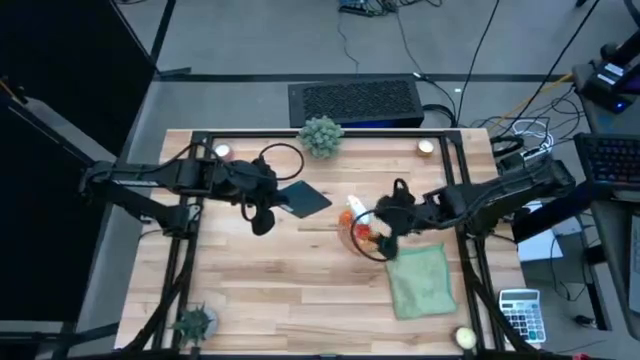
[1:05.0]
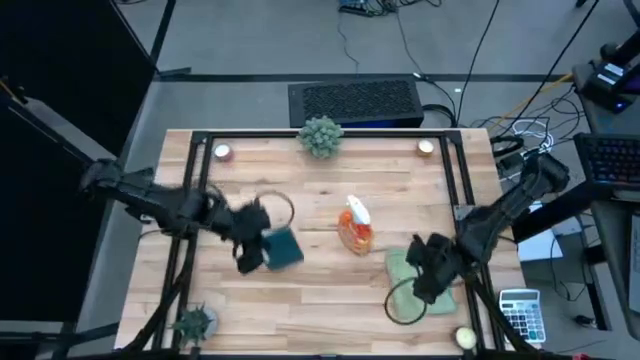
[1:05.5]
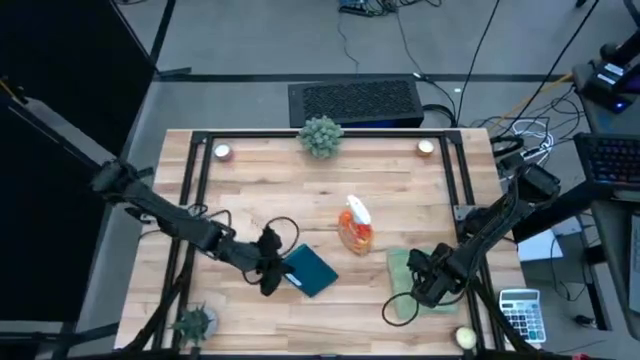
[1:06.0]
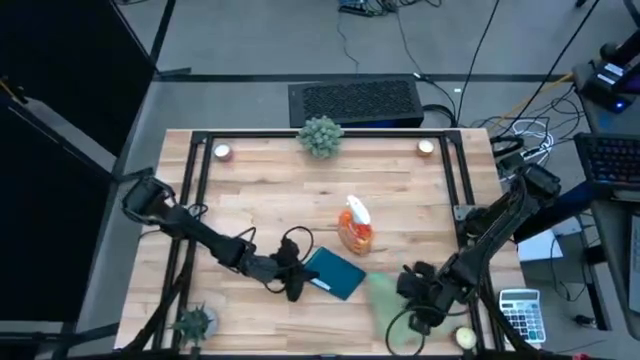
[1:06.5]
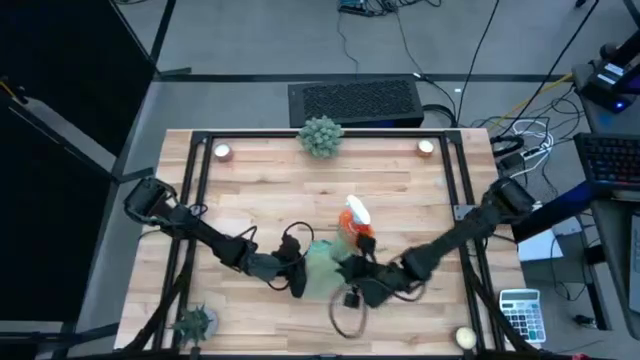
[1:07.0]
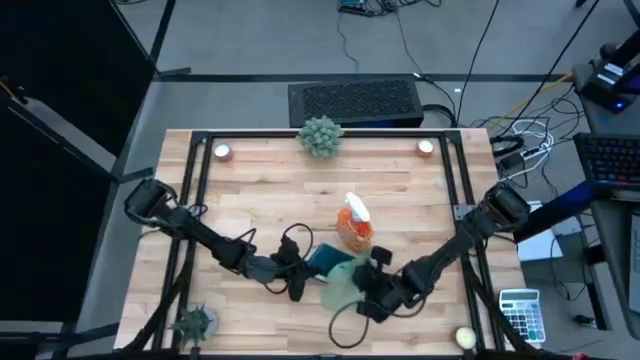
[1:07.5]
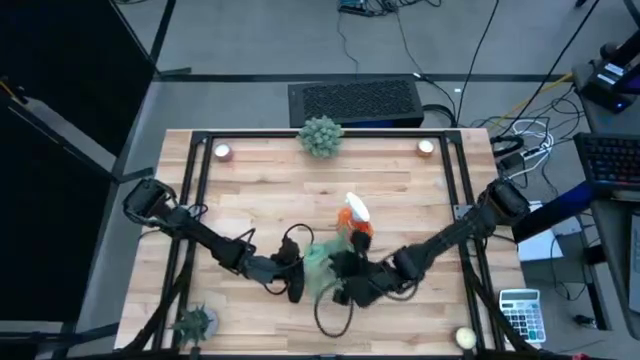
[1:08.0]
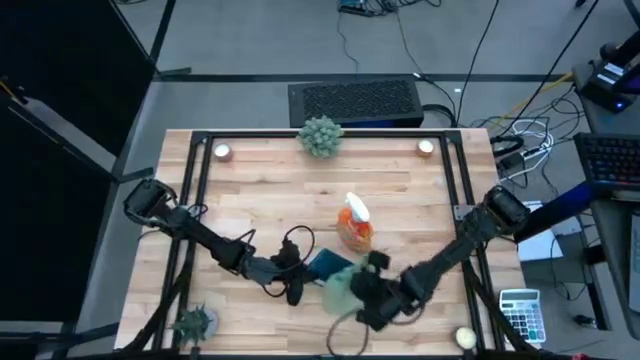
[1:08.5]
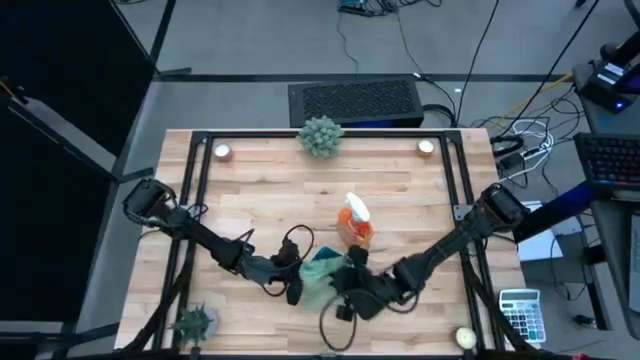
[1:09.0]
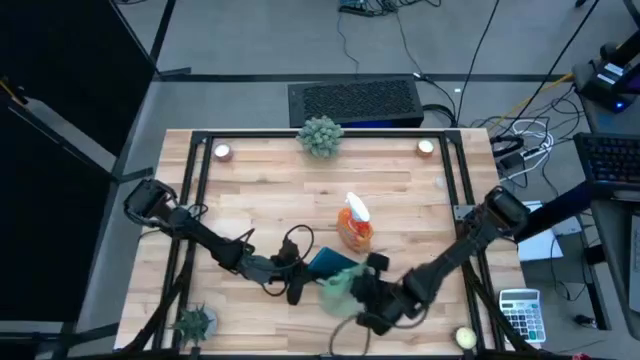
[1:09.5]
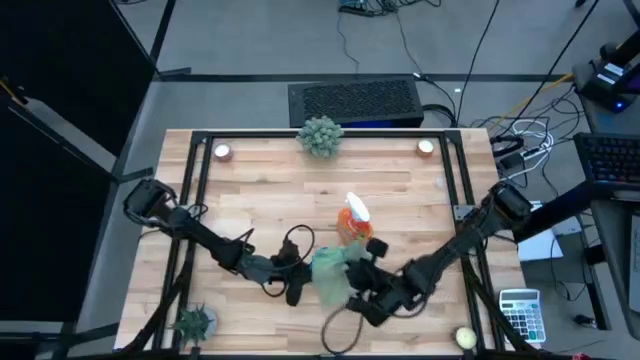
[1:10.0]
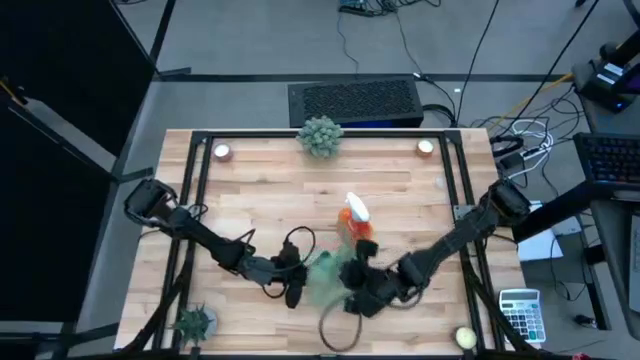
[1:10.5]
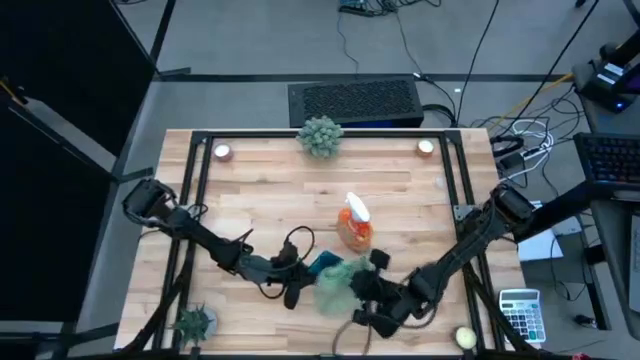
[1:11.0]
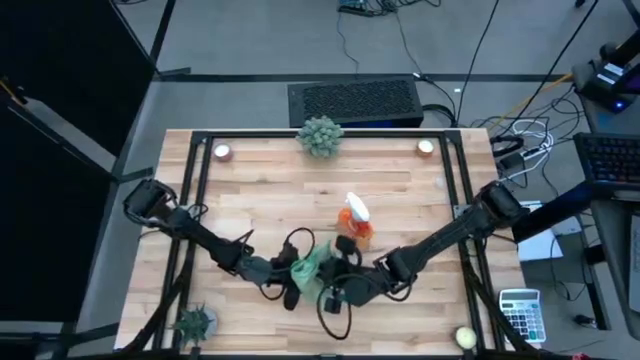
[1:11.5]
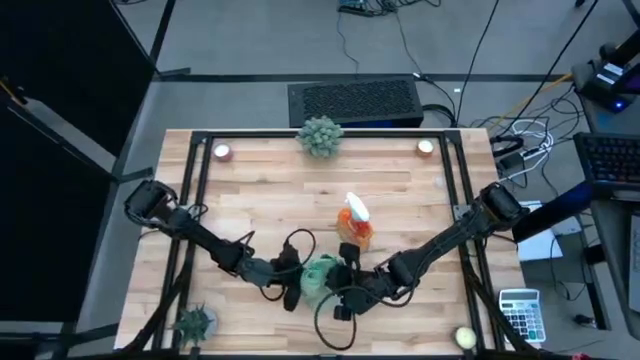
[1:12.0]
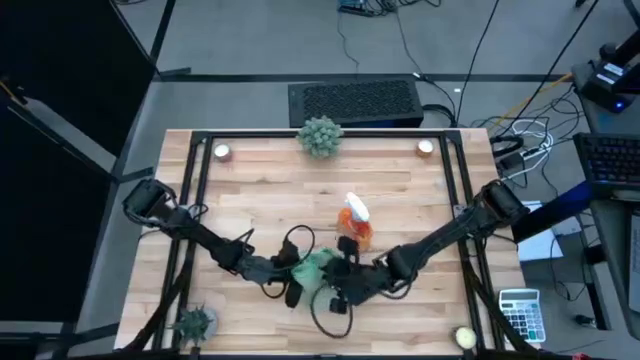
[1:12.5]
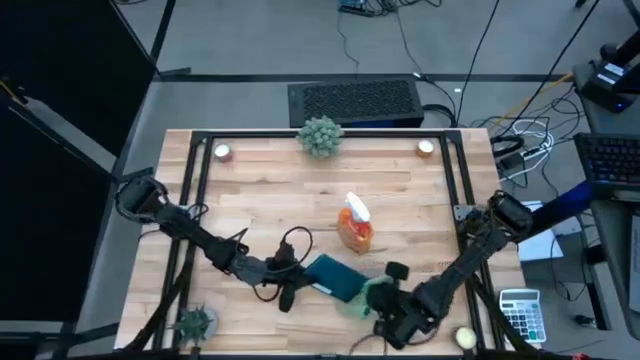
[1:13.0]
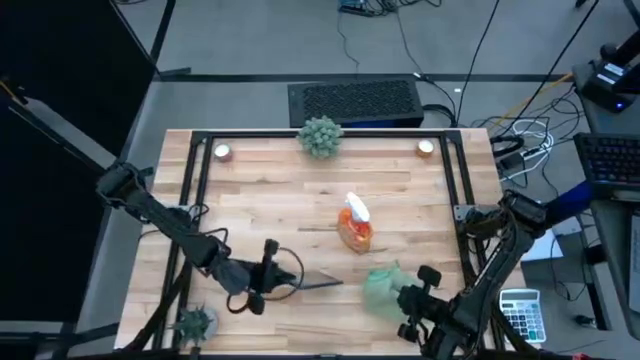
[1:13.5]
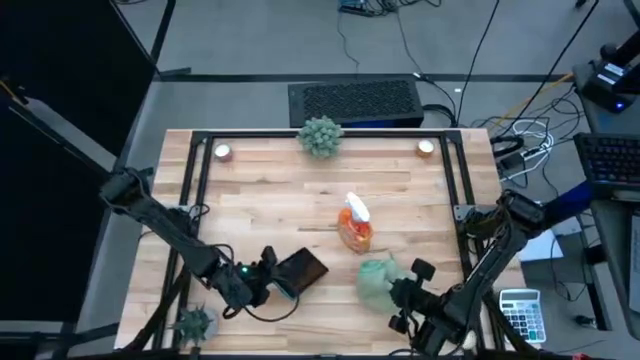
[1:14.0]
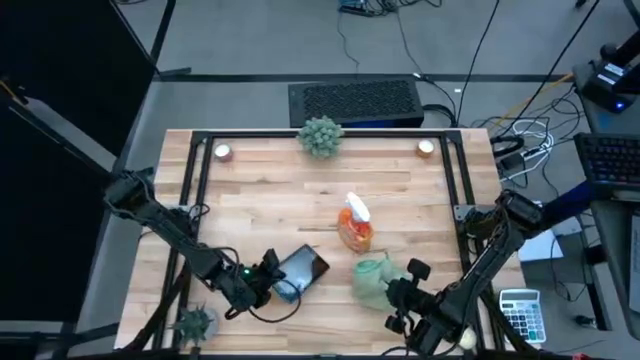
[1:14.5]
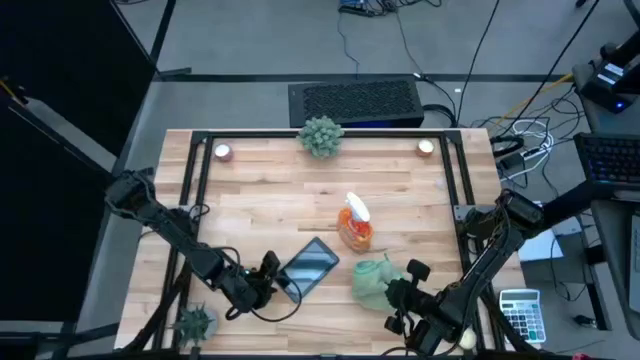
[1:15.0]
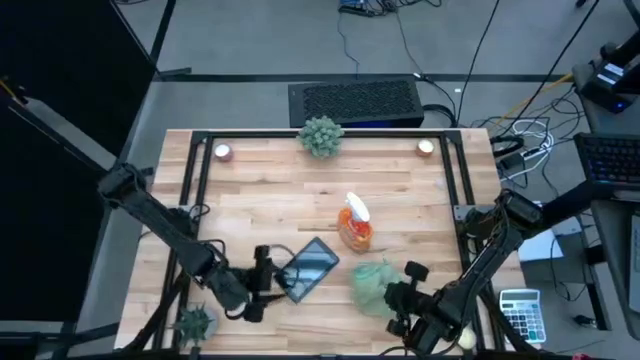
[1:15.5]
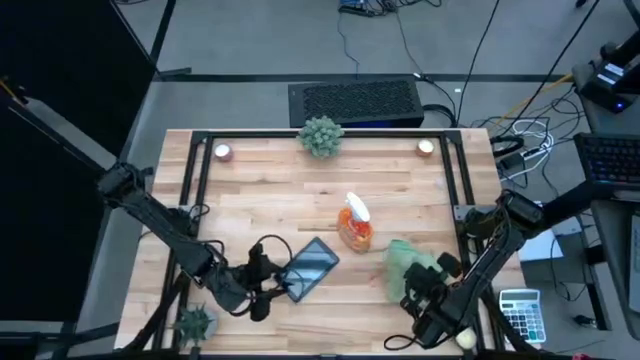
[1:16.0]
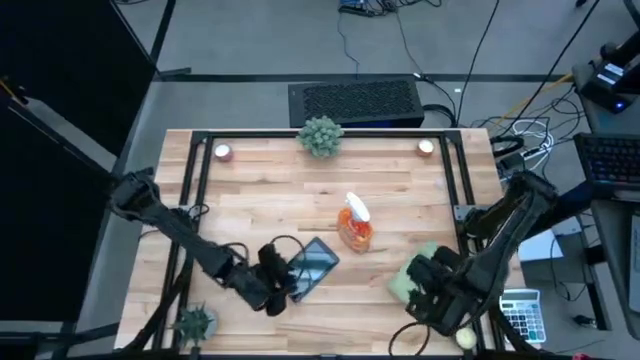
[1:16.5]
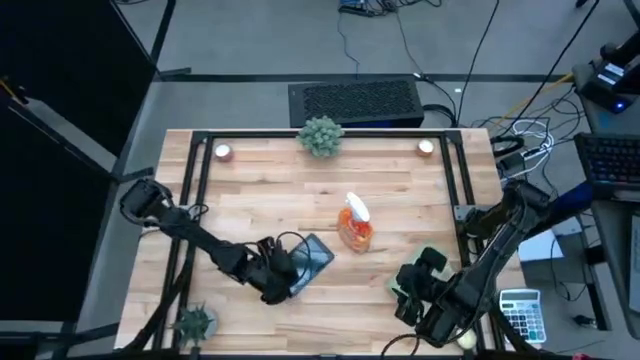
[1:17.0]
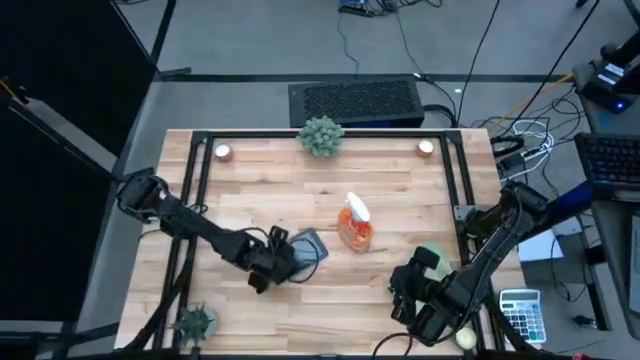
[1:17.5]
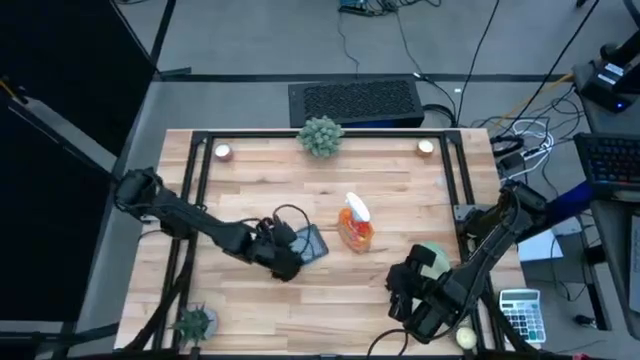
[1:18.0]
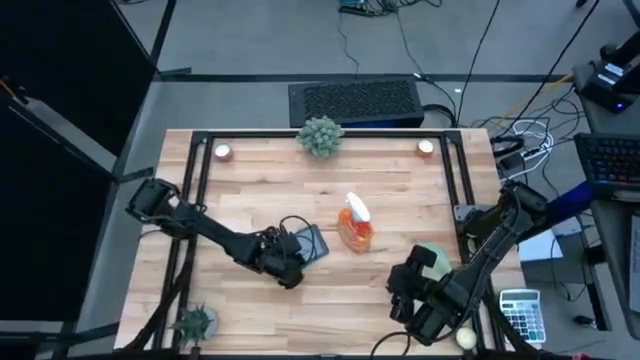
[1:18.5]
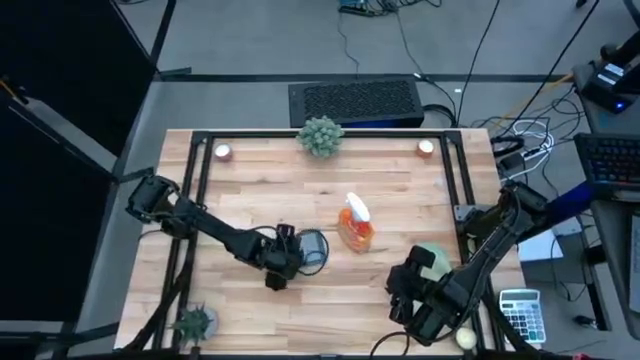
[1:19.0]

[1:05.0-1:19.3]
Task: Apply microfiber cloth
Wipe the back of the cellphone using the microfiber cloth

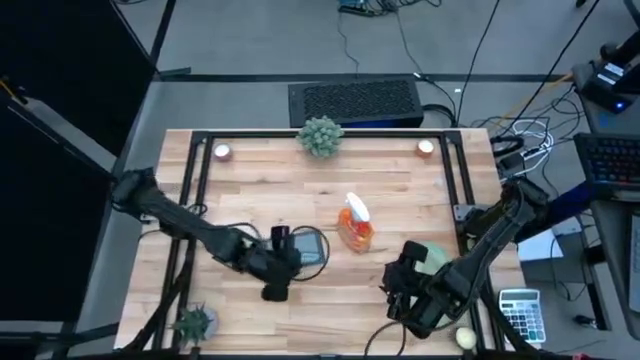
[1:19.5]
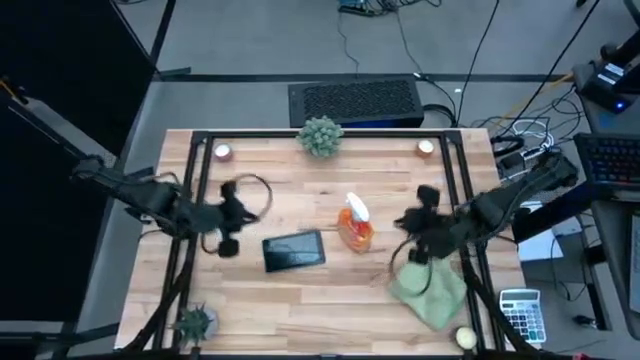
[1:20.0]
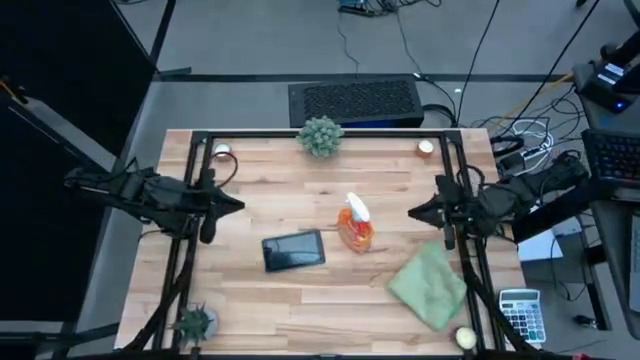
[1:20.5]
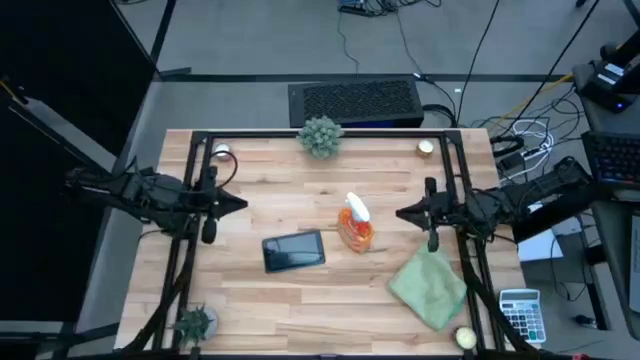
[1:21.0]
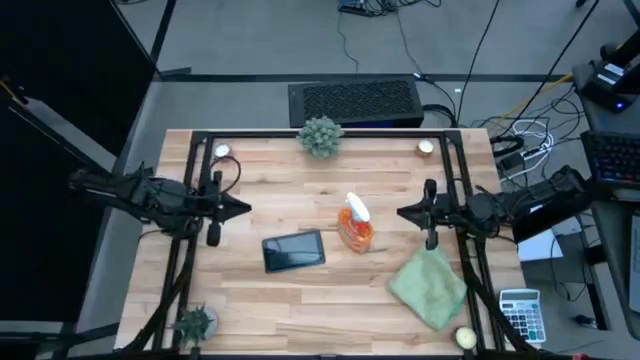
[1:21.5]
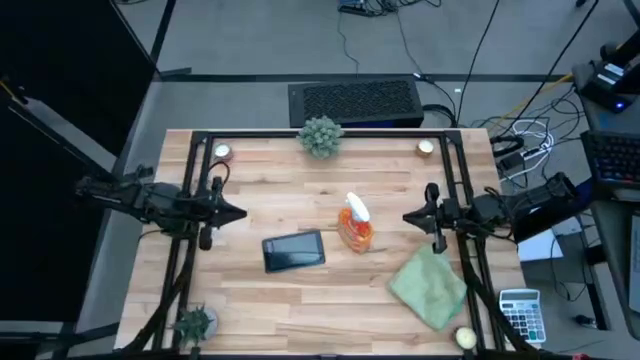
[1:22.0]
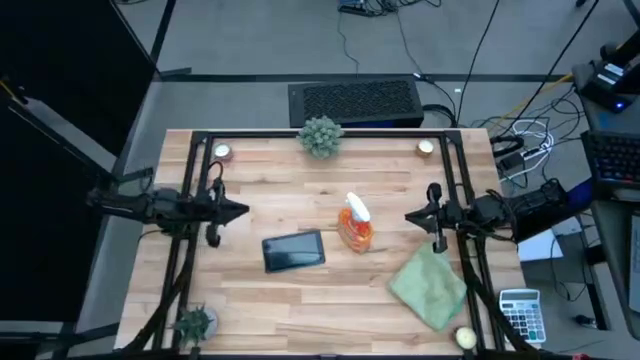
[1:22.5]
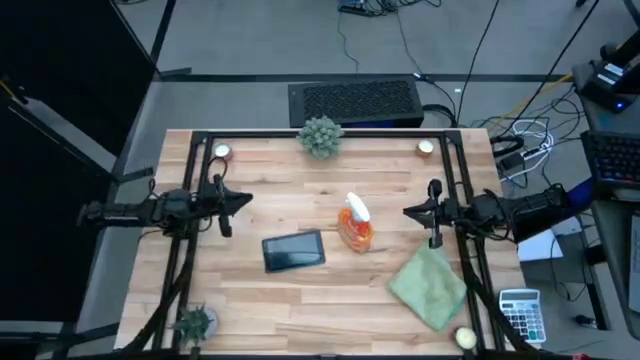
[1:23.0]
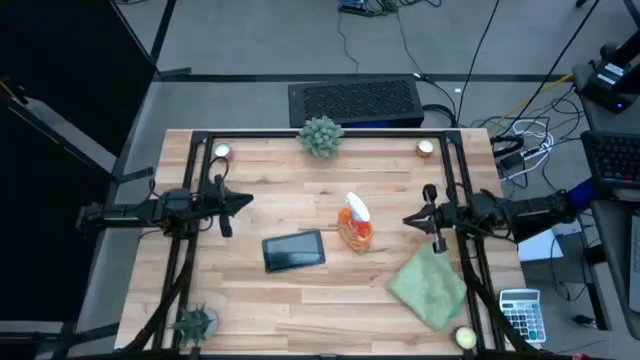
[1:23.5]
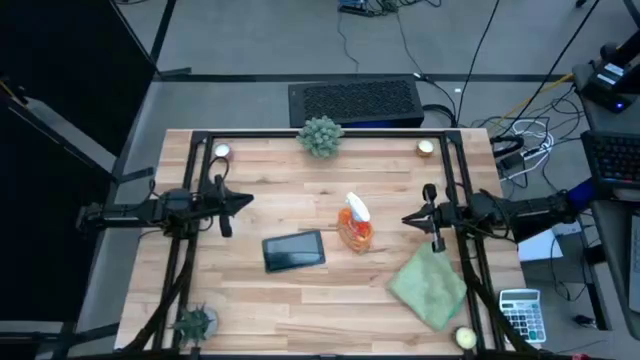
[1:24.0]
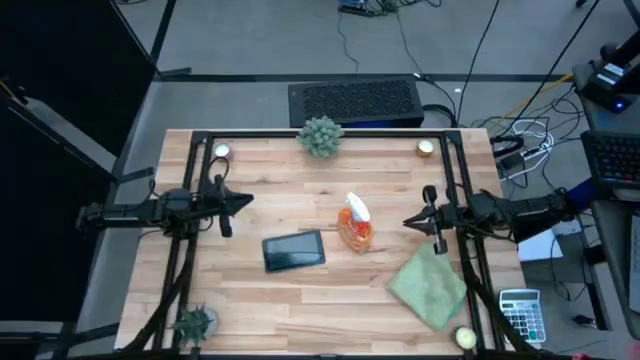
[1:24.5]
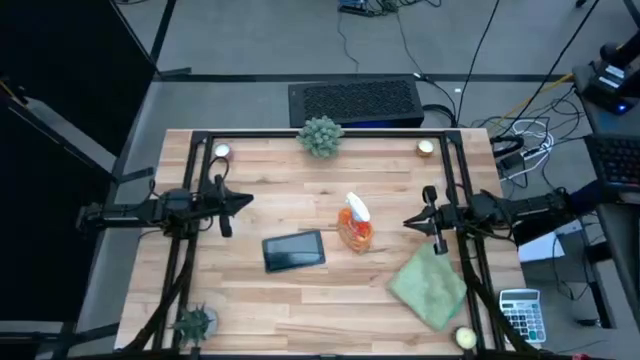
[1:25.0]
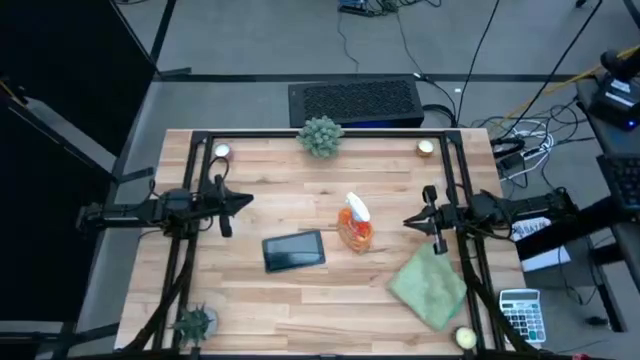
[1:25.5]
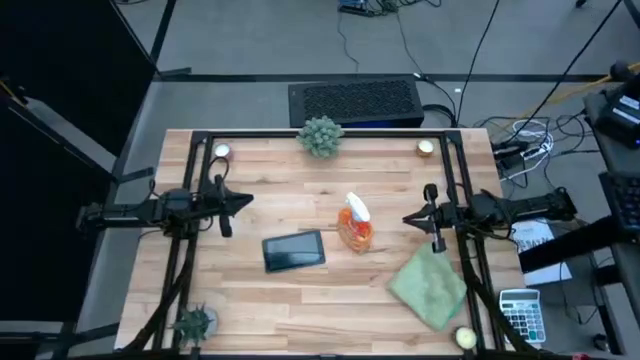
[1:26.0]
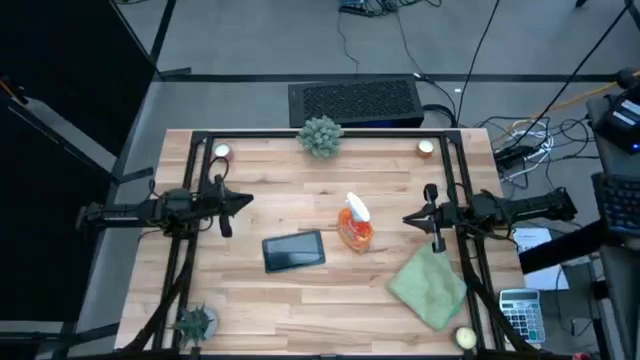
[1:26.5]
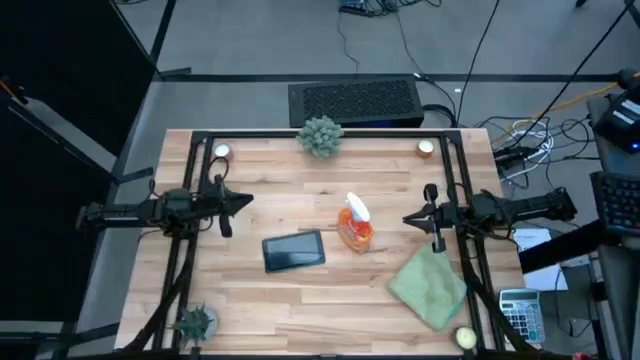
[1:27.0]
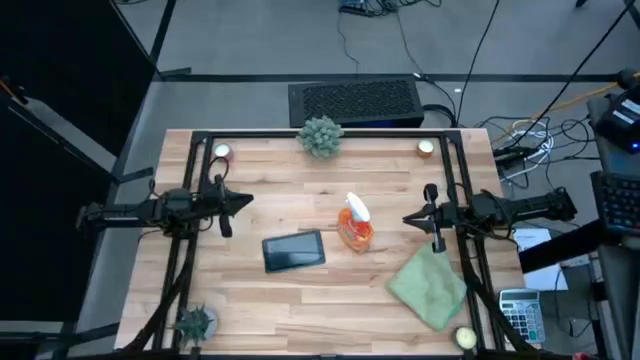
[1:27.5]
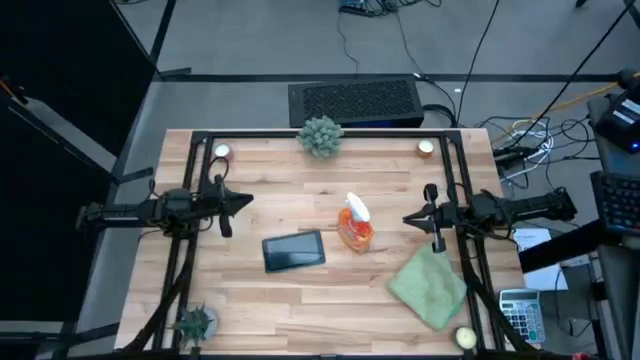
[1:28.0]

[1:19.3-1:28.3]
Return to Home Position
